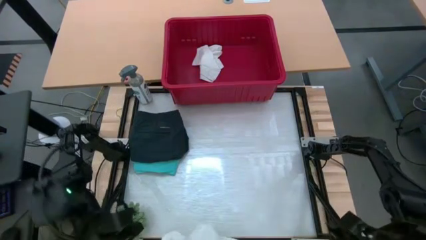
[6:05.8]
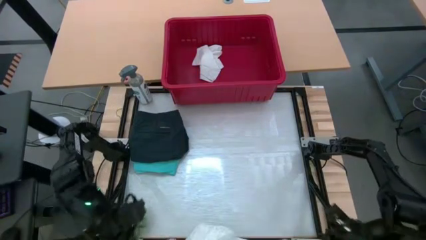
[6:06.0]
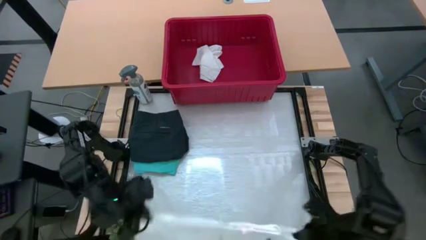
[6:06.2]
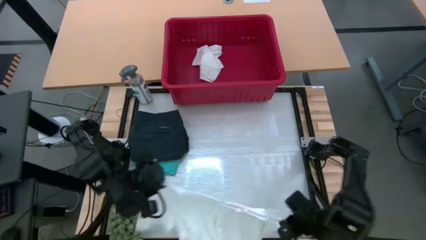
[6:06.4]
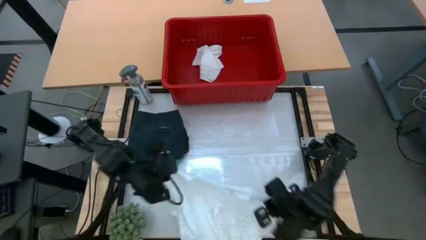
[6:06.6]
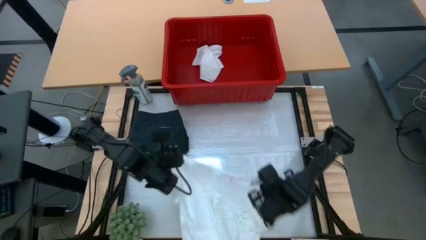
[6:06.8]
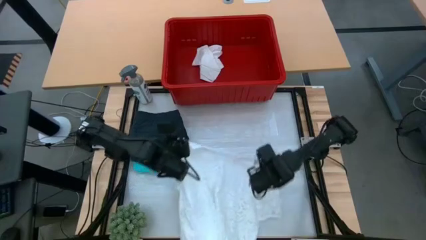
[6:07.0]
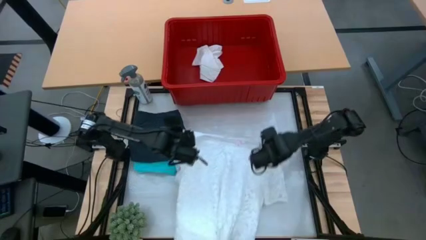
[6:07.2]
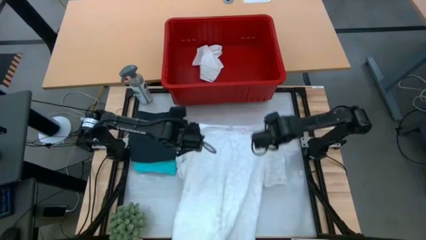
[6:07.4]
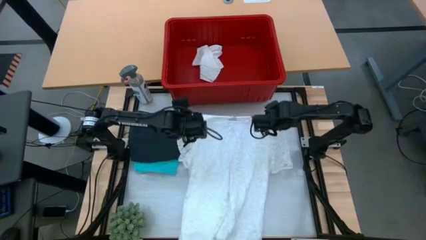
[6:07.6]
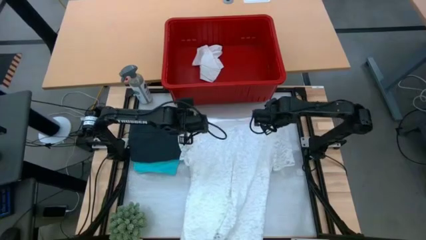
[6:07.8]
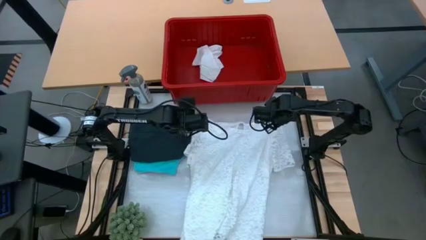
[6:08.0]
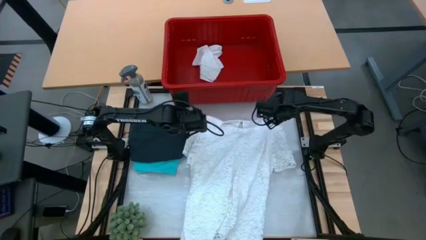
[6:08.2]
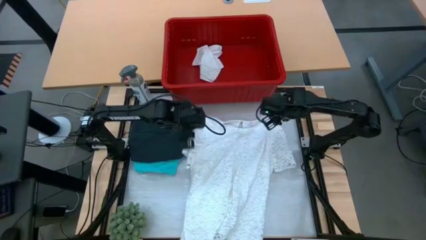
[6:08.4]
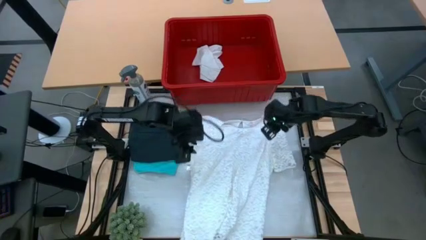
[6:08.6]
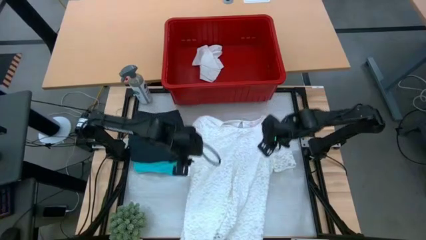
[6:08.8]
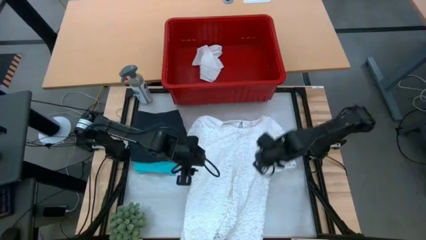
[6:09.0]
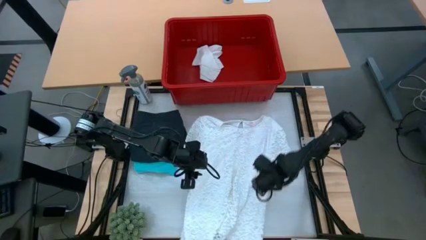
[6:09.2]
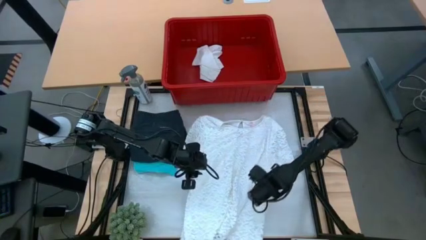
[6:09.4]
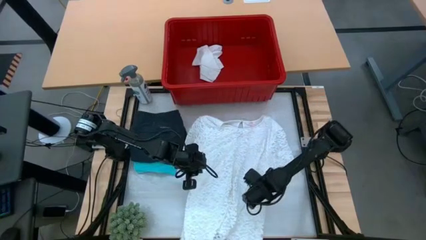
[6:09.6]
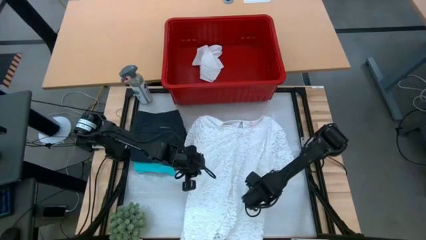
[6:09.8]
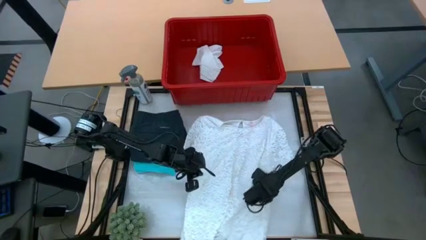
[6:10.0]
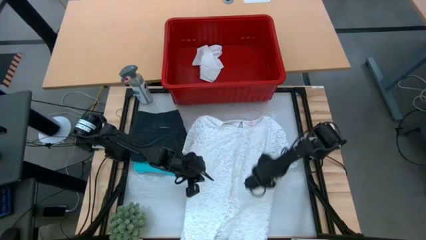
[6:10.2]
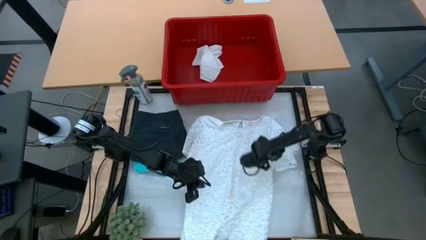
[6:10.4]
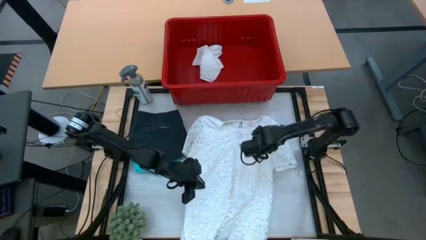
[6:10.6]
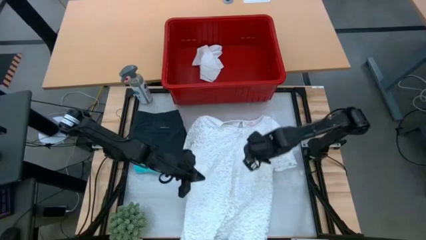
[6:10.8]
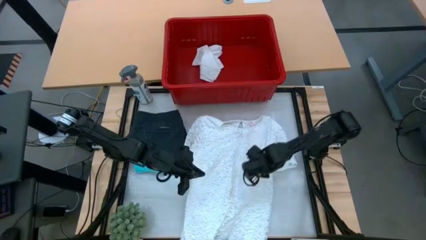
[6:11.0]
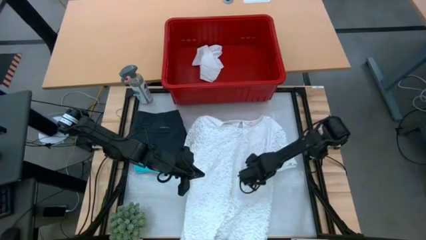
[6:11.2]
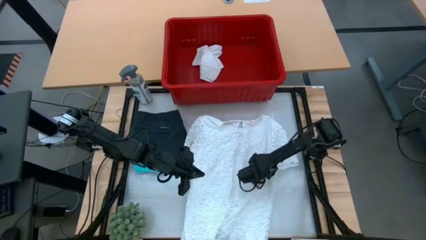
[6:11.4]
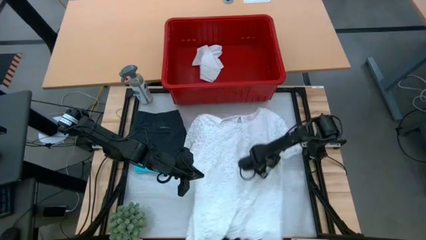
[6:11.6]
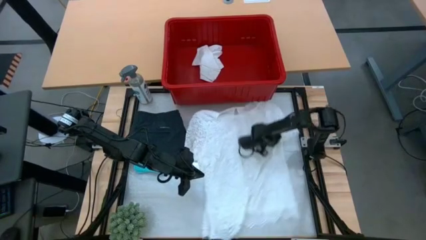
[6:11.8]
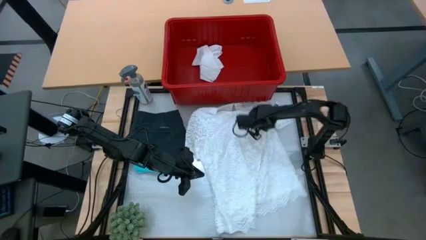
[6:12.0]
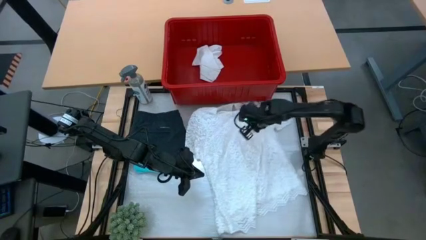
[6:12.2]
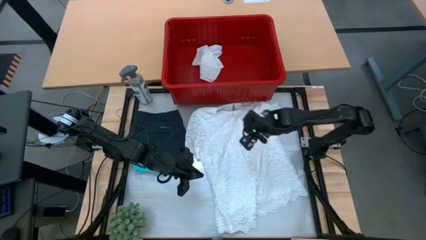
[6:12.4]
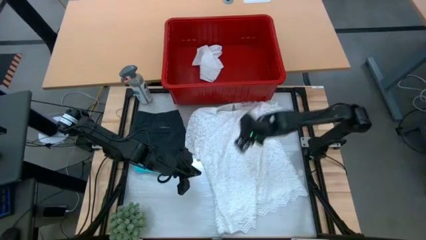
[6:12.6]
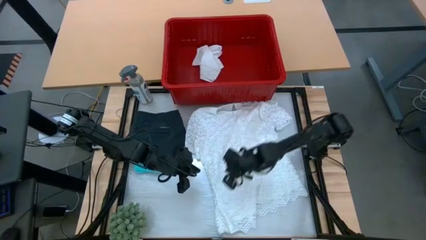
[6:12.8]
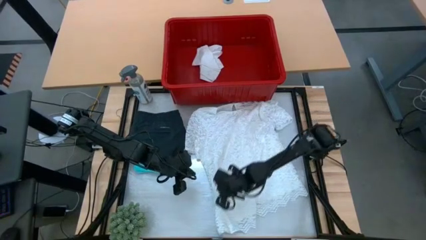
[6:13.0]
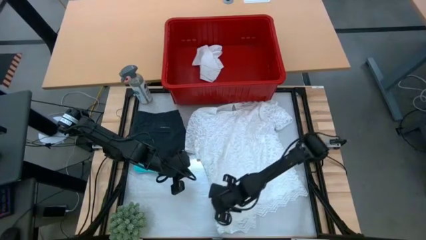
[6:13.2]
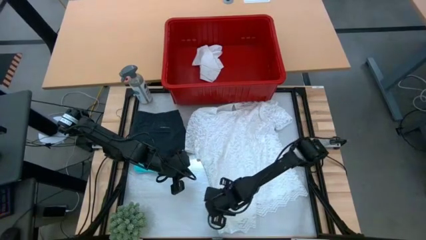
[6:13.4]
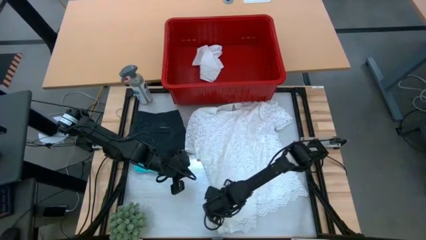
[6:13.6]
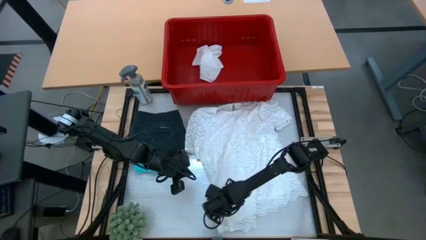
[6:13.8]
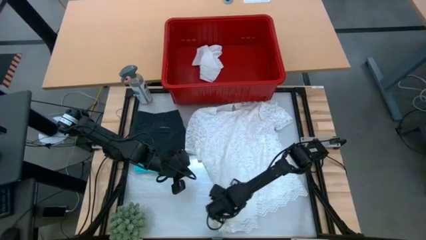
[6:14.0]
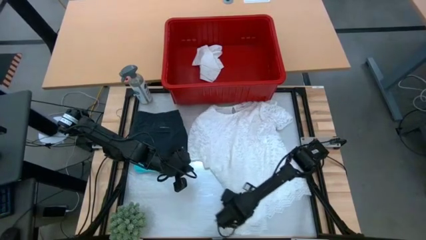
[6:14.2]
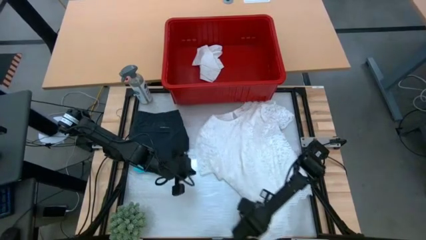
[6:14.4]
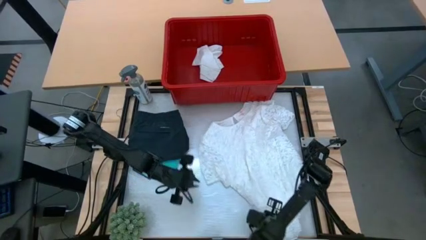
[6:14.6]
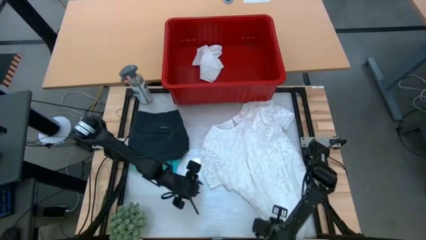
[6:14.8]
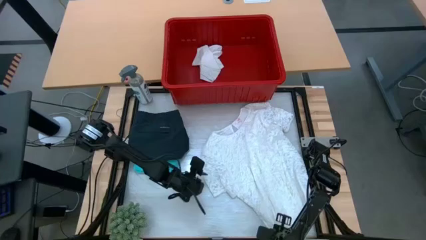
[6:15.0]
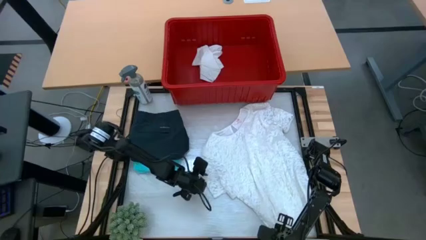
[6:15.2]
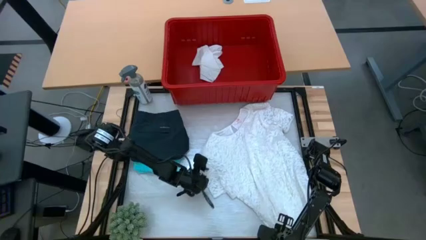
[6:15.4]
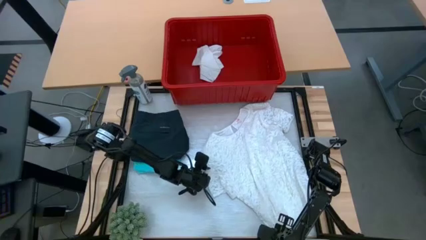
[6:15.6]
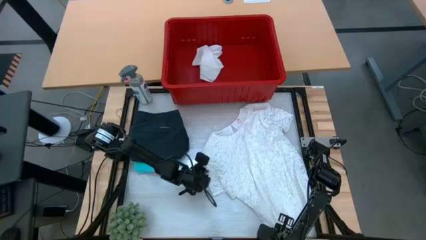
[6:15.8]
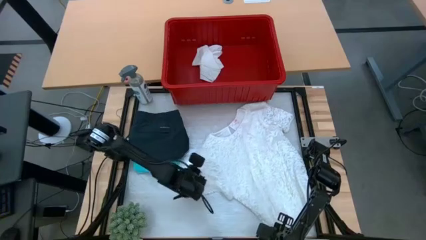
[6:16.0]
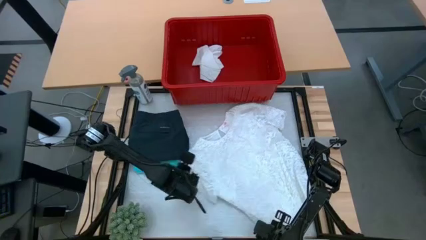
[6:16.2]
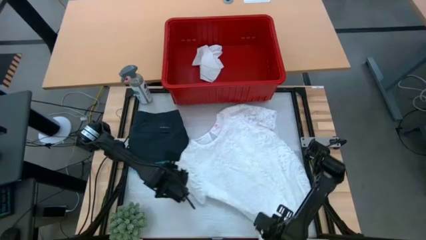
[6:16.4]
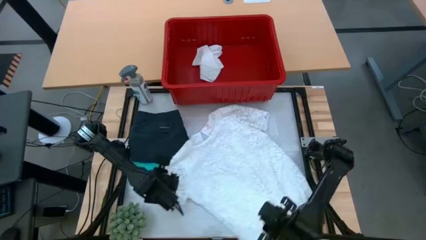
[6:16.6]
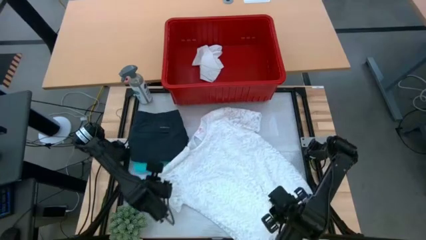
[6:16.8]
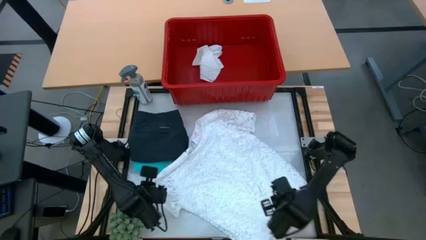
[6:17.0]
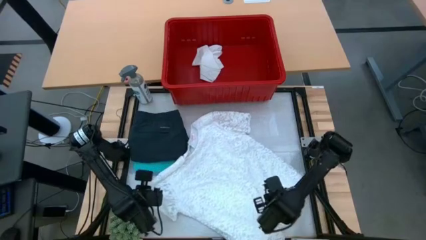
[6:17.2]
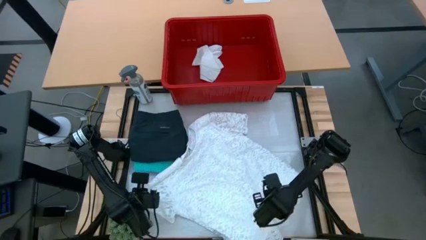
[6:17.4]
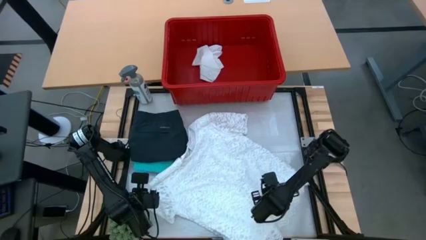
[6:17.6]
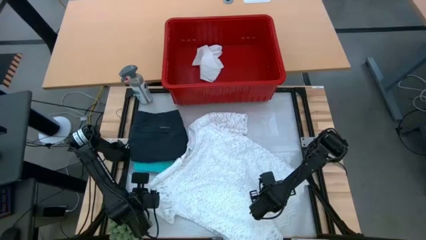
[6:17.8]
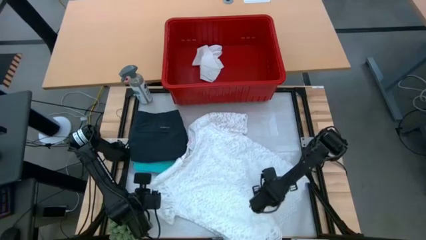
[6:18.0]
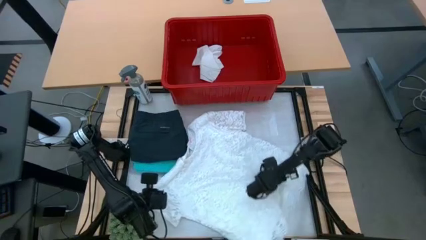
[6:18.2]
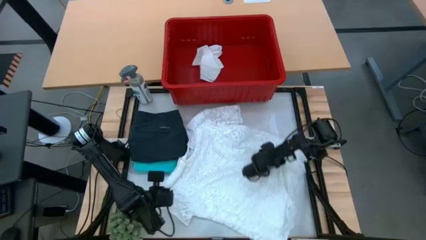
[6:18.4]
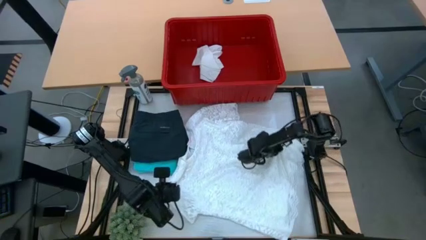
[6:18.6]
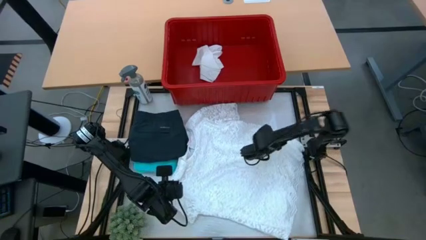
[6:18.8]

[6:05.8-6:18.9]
Task: Fold laundry
Fold the white dress

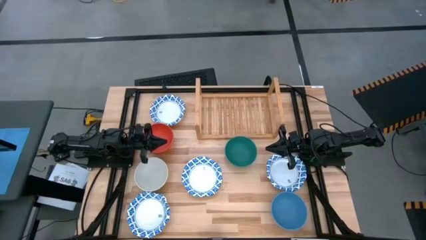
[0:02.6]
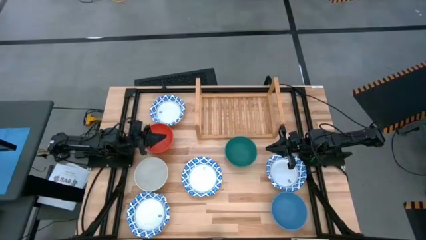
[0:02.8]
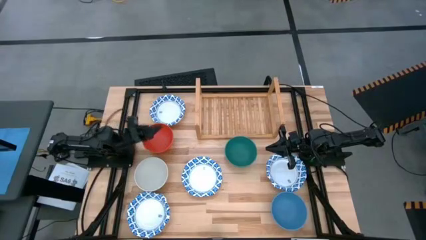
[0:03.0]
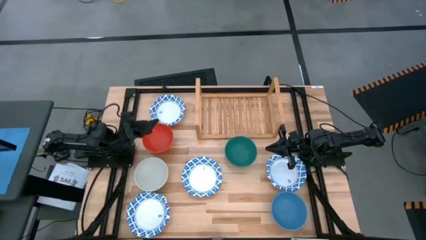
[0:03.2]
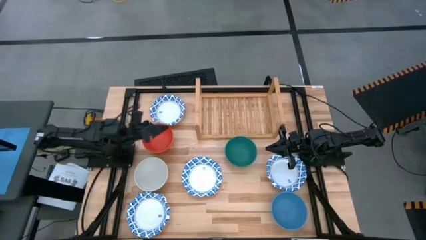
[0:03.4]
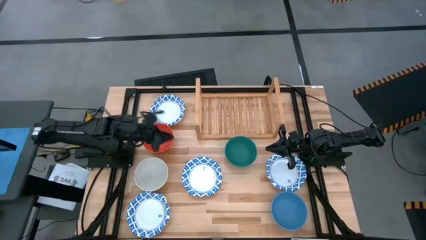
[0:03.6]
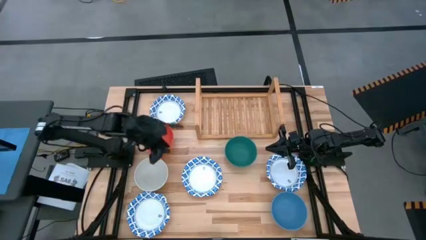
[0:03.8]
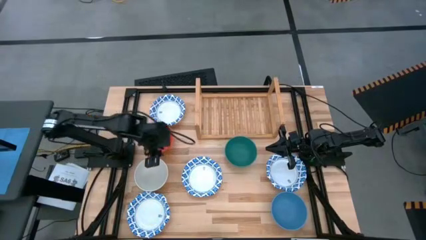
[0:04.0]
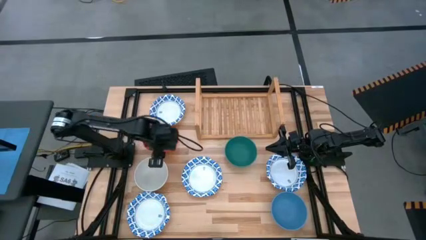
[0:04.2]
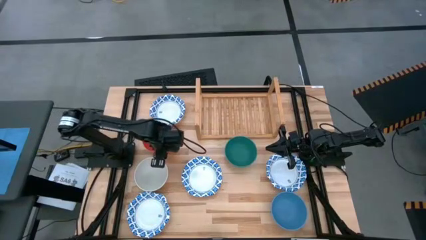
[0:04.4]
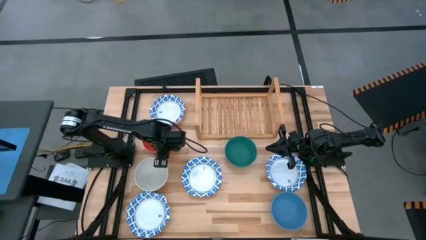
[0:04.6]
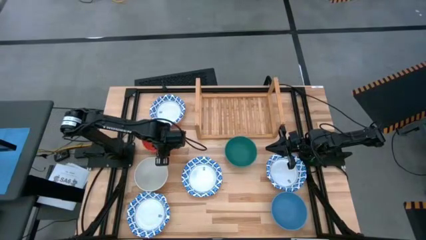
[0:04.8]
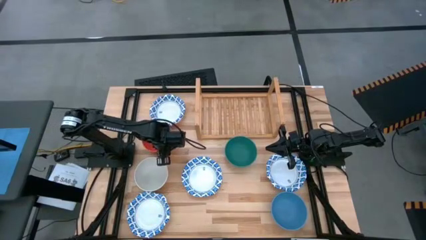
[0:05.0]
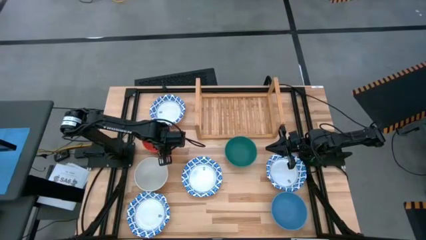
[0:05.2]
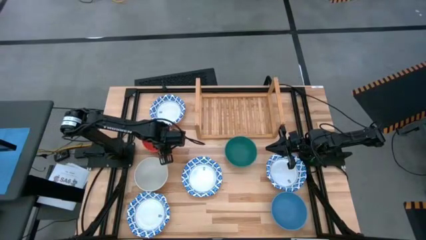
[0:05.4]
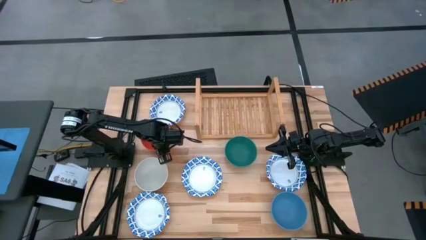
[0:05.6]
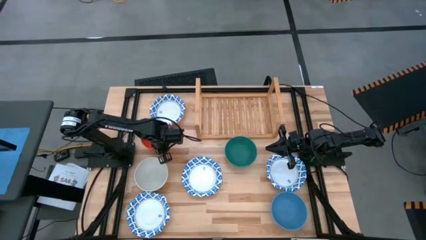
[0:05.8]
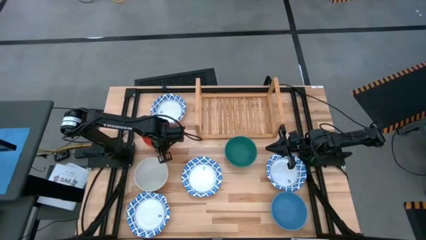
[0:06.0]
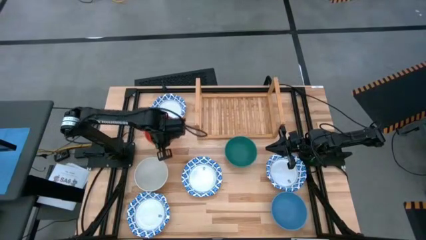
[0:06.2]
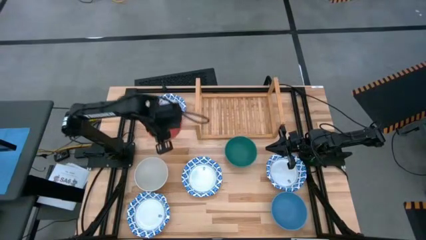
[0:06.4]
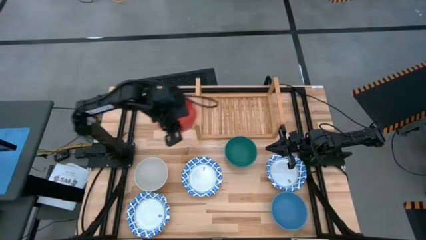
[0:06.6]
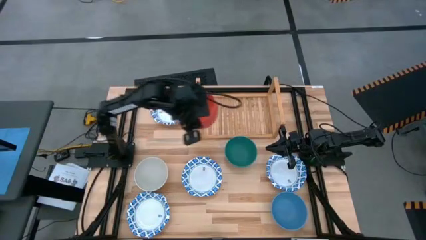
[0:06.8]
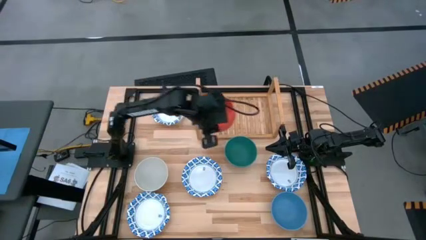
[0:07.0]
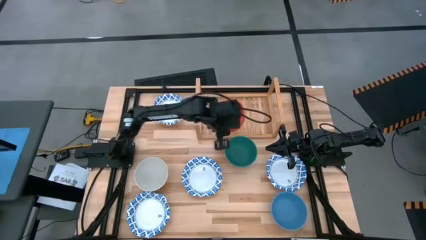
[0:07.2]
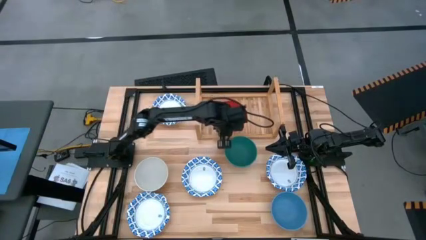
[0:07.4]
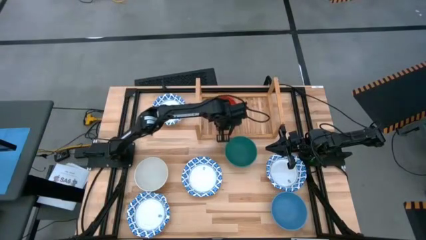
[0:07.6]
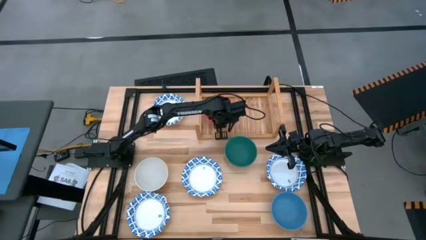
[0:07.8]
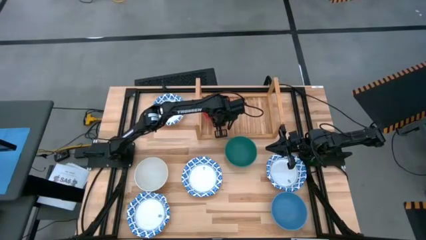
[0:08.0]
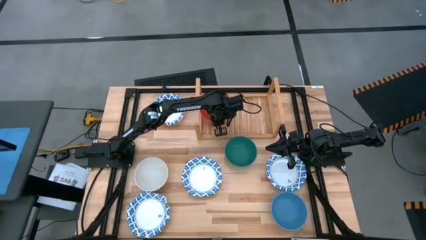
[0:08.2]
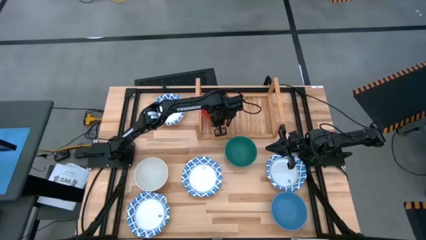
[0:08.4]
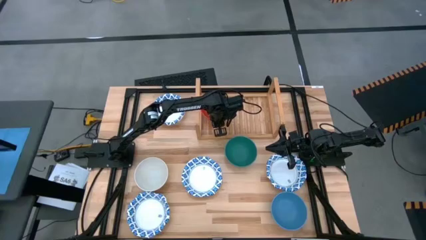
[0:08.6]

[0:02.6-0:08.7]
Task: Place and stack bowls onto a shelf
Put the orange bowl on the shelf
